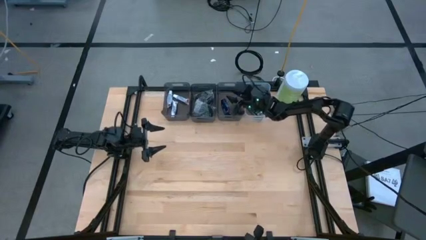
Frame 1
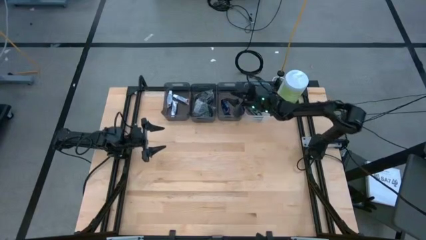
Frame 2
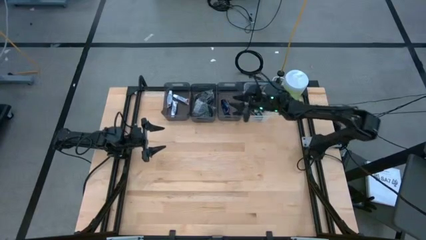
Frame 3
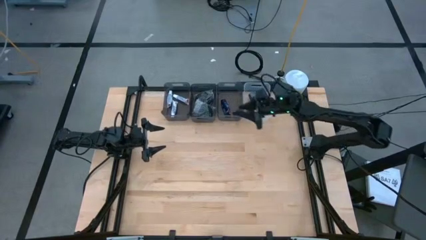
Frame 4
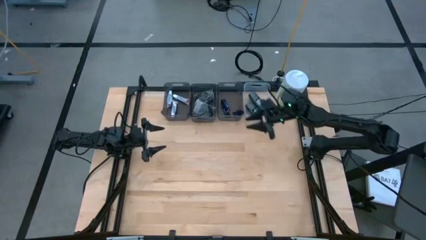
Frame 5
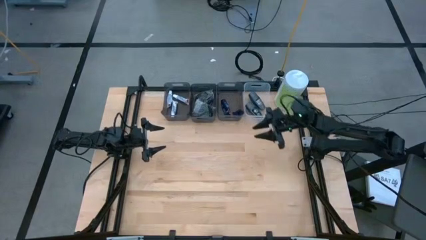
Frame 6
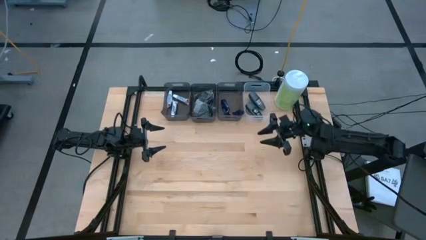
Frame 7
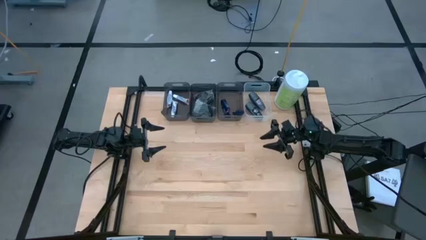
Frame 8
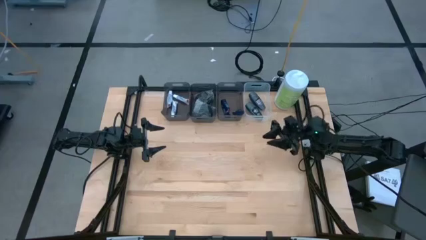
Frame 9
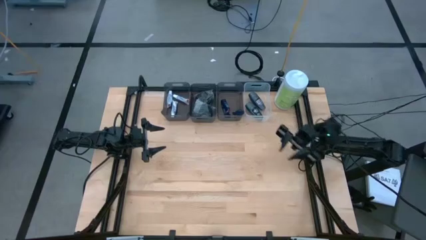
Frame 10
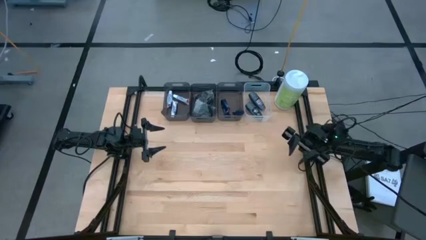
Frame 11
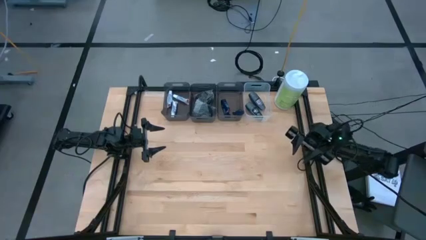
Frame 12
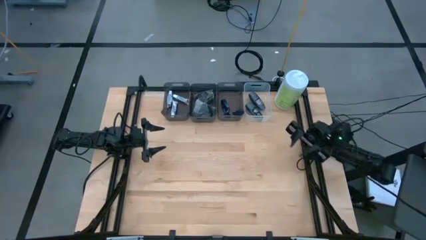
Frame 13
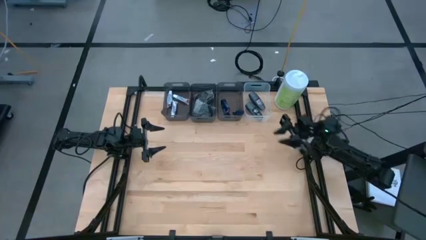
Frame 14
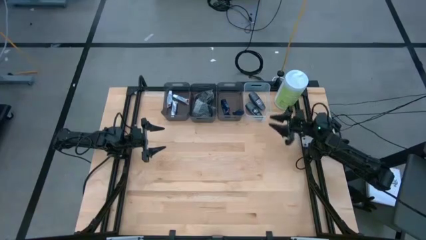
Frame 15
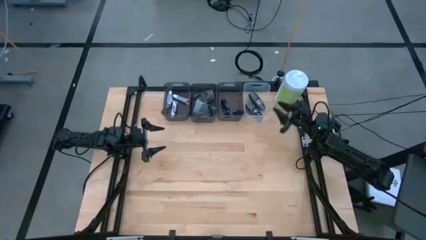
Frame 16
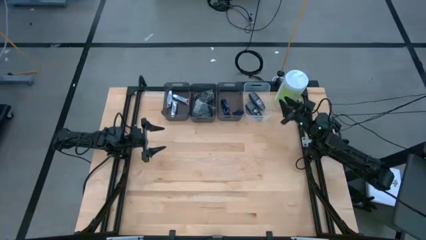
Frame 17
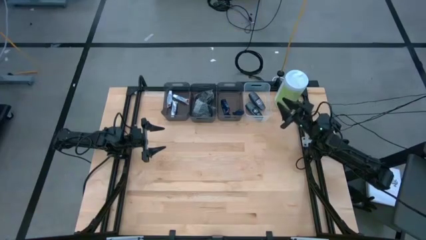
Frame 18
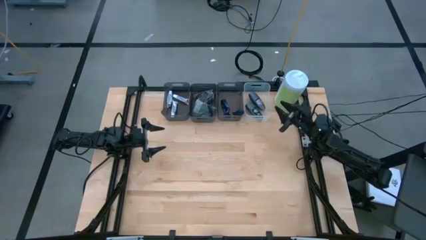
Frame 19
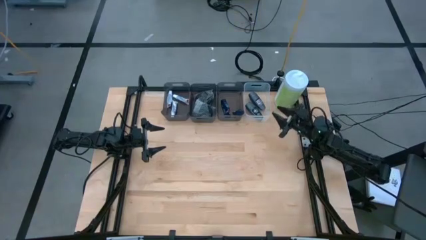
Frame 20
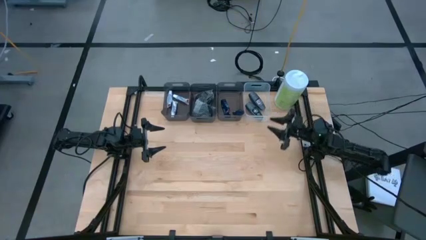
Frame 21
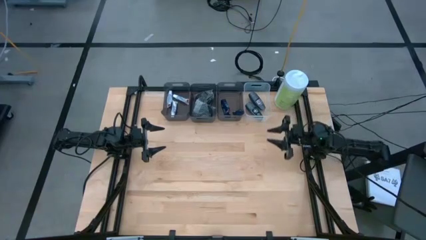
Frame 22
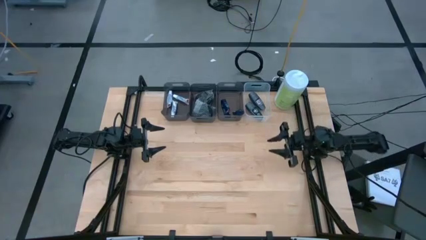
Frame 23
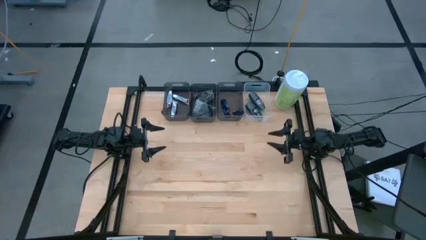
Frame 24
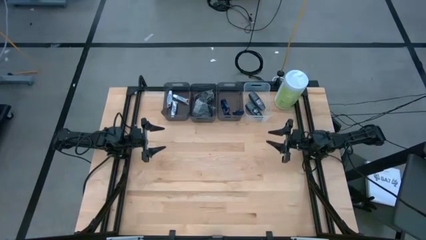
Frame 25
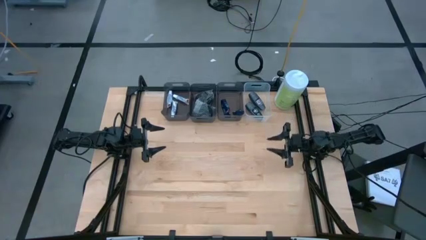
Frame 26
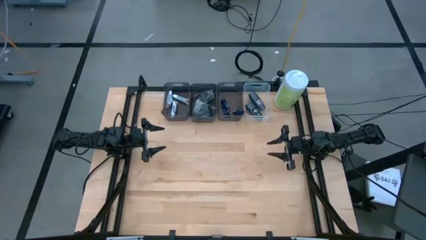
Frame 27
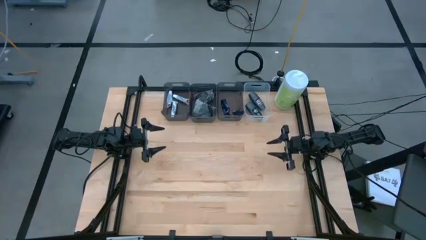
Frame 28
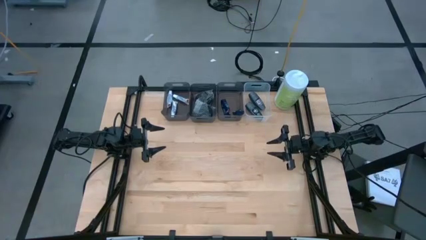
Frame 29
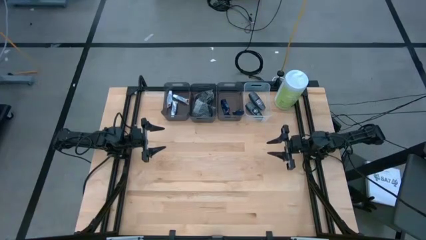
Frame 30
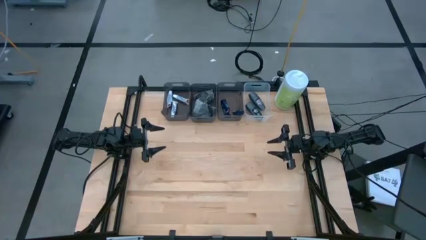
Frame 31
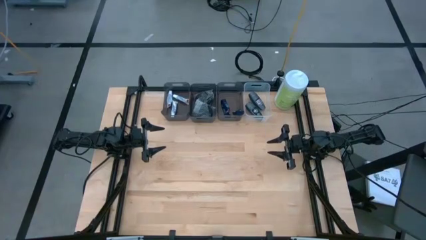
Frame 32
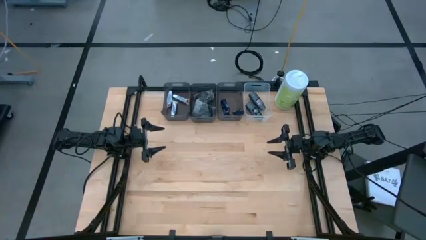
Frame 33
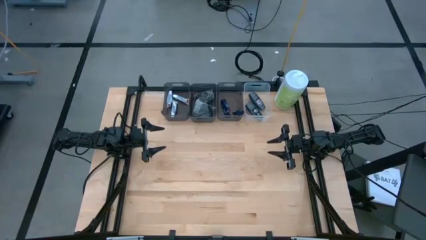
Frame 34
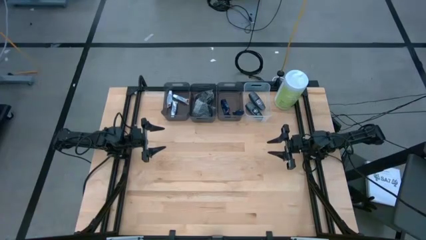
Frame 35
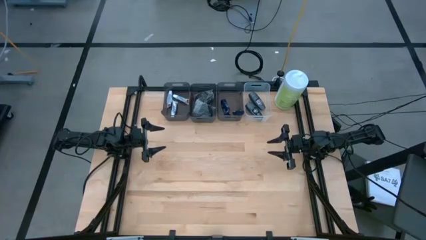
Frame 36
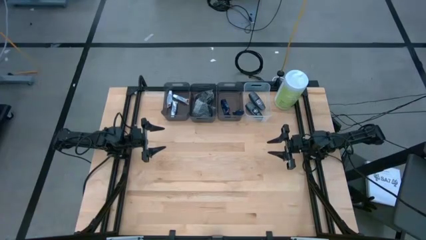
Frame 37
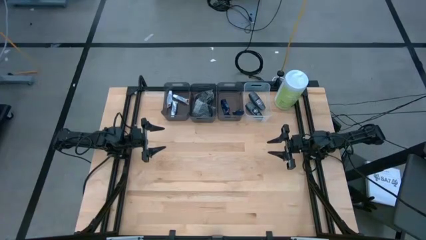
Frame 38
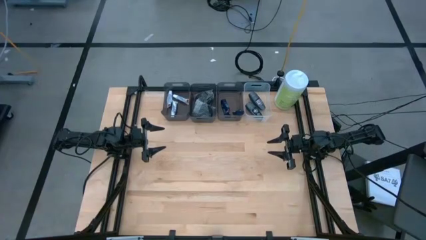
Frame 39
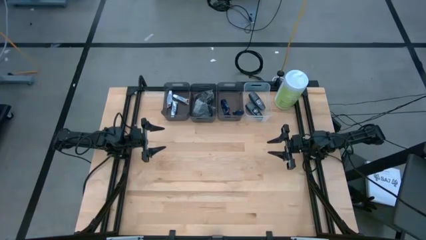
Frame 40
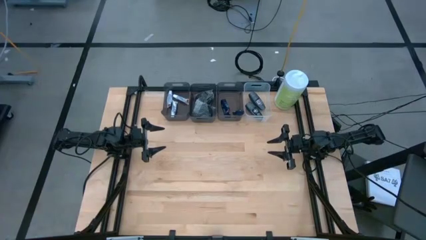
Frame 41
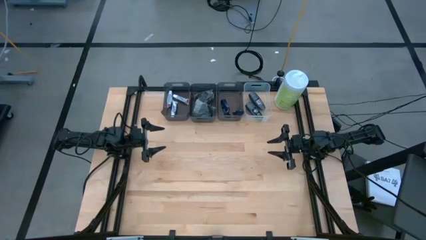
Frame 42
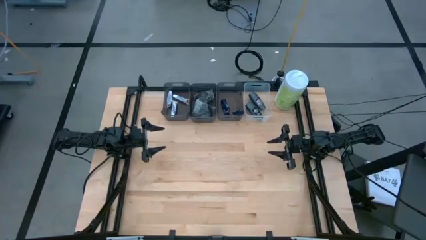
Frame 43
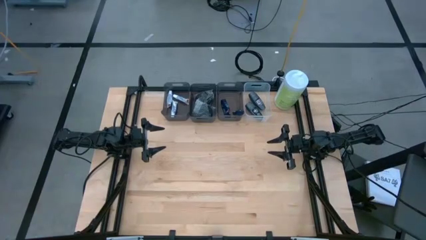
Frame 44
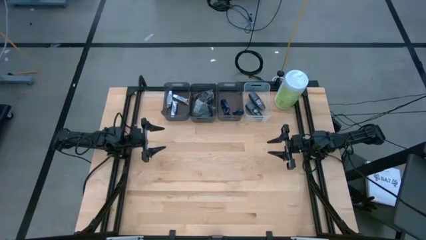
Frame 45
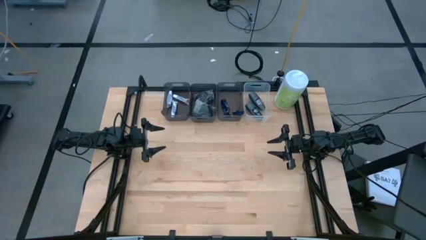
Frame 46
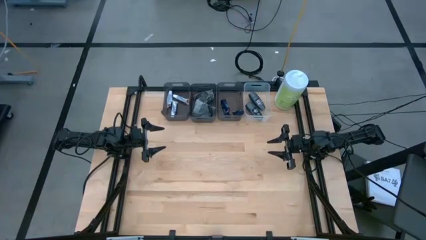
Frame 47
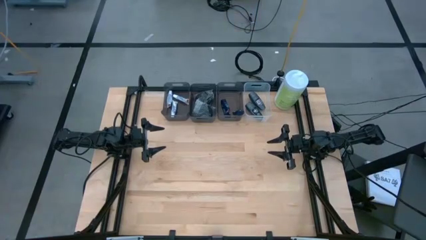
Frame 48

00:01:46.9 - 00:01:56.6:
Task: Pick & Place Travel size toiletries
Return to Home Position

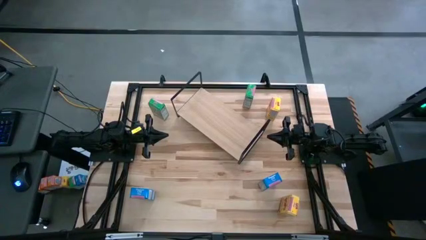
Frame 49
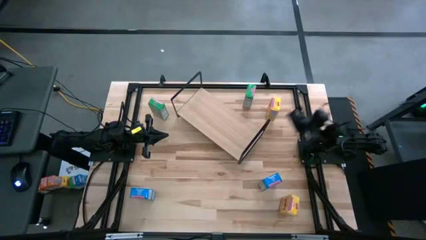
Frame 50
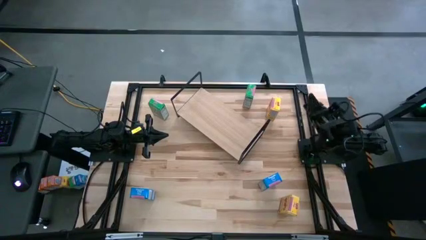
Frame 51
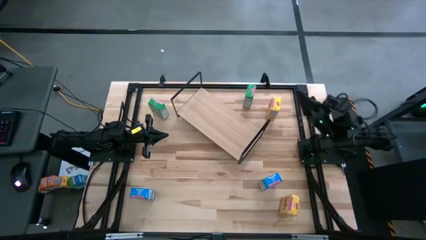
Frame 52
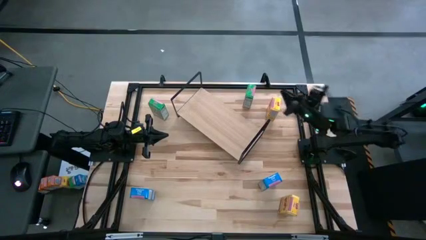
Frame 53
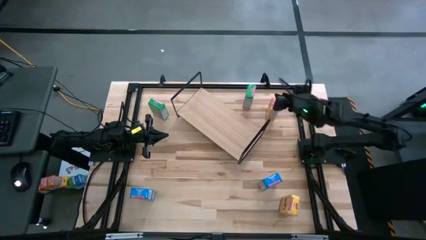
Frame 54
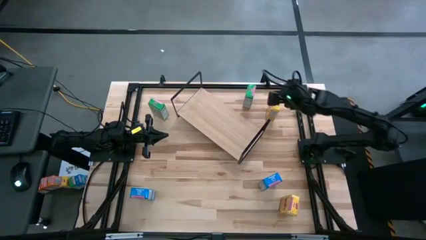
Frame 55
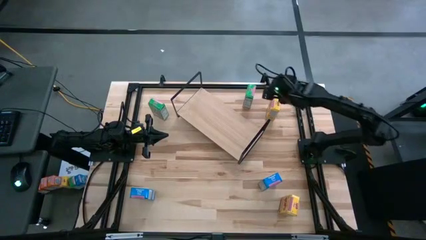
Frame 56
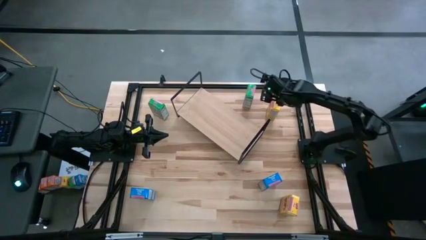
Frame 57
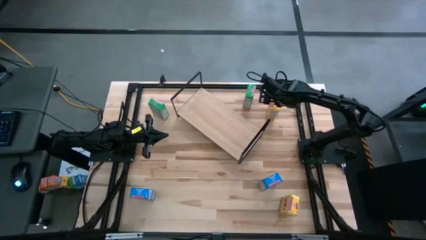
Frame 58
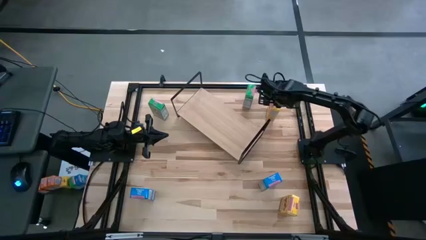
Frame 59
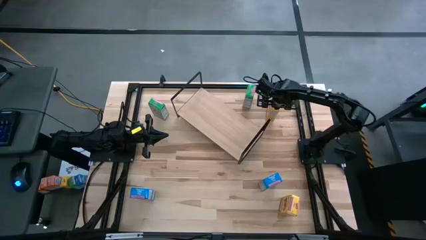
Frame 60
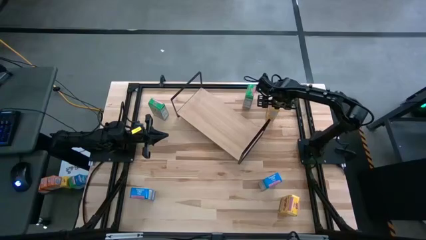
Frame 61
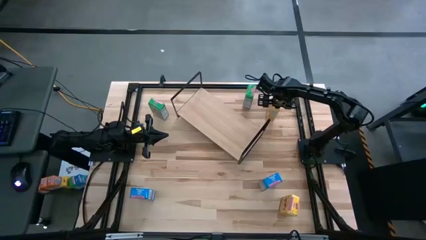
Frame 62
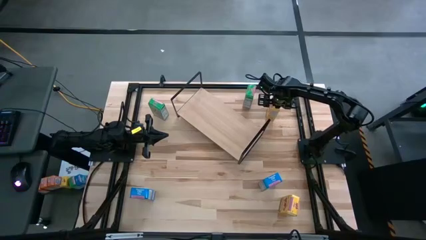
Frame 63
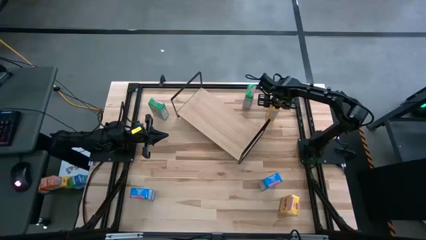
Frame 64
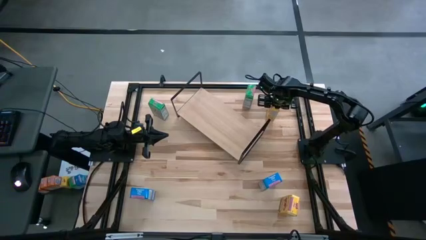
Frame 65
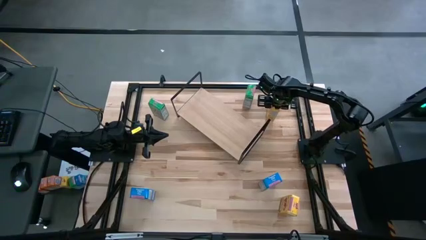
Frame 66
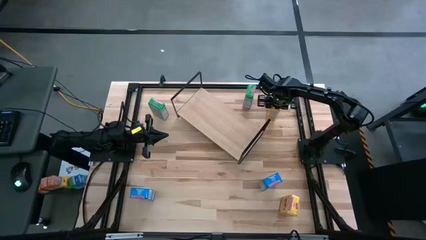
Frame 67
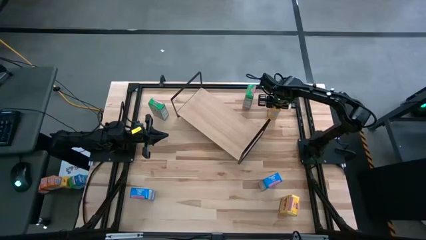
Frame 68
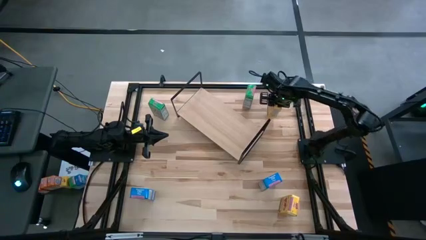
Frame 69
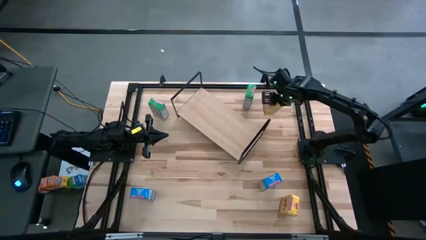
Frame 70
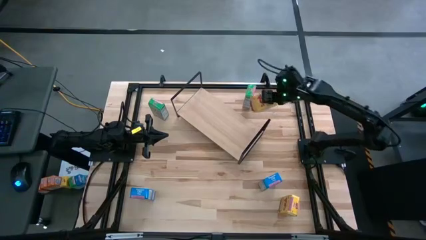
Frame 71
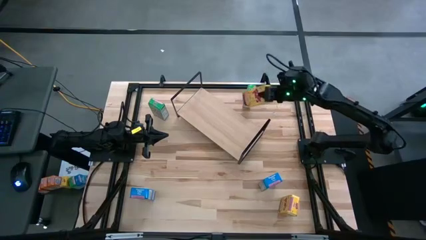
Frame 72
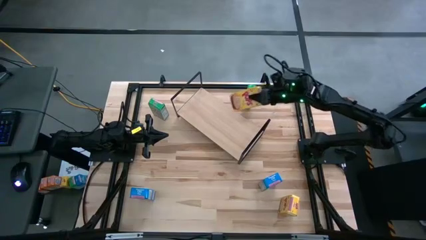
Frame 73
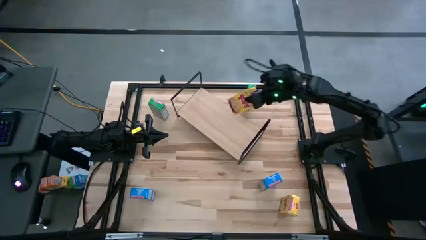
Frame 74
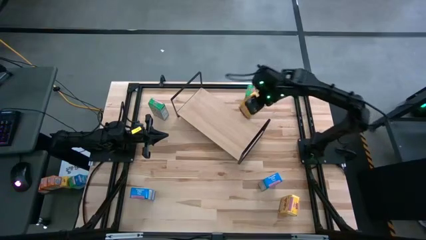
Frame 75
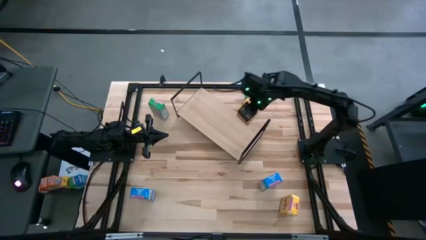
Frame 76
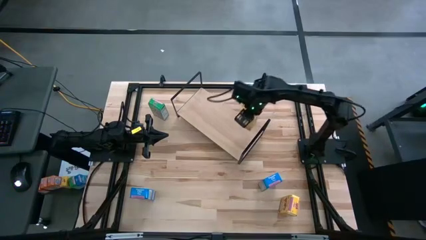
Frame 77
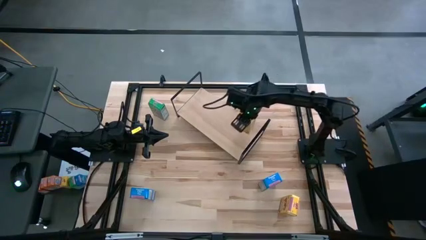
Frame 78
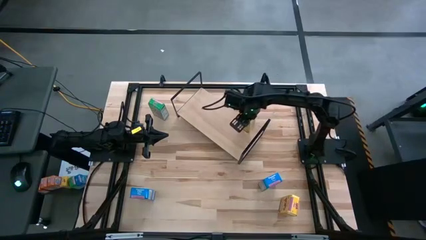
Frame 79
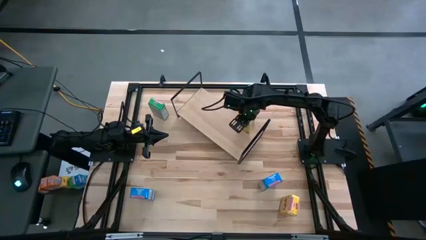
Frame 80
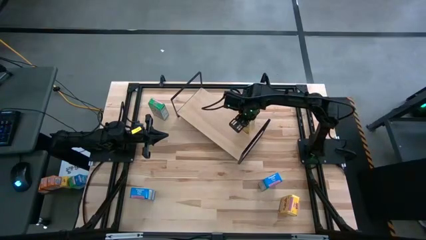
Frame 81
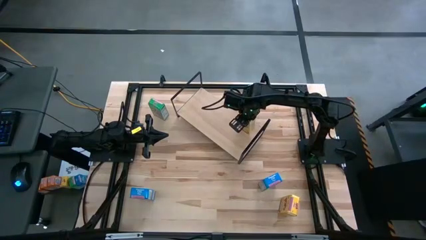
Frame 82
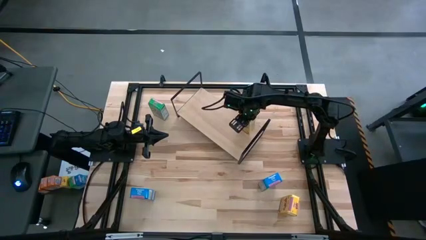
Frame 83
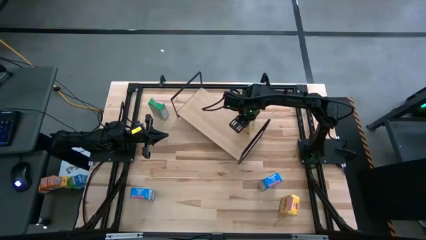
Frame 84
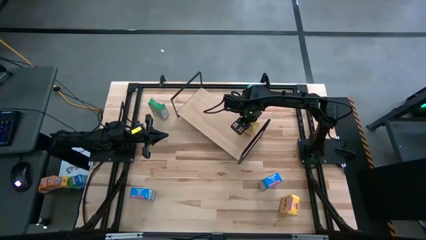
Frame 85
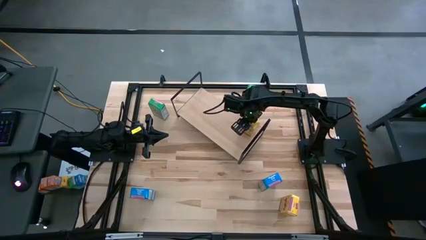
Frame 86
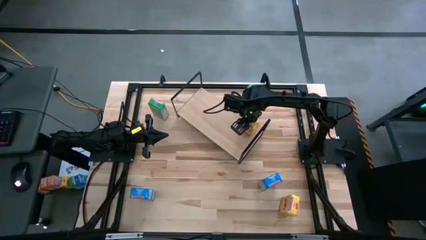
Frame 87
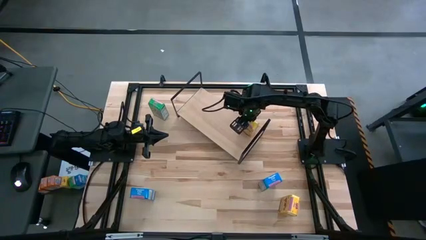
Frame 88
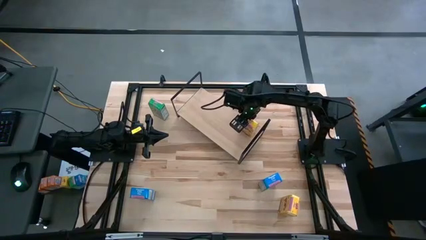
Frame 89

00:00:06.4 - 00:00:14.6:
Task: Stack cereal on shelf
Put the top yellow cereal box on the shelf
